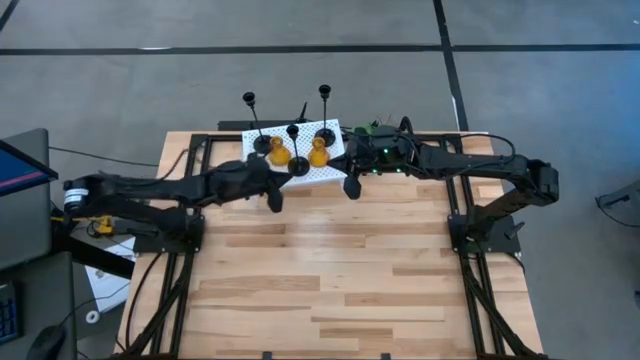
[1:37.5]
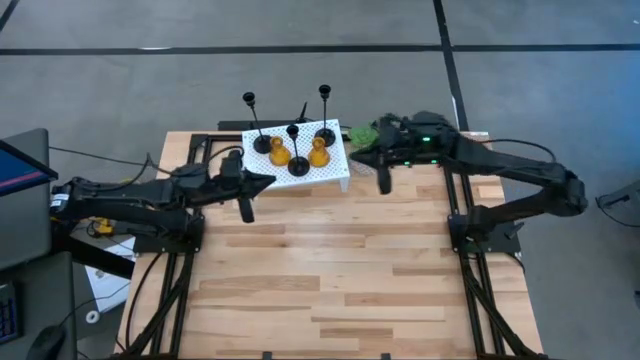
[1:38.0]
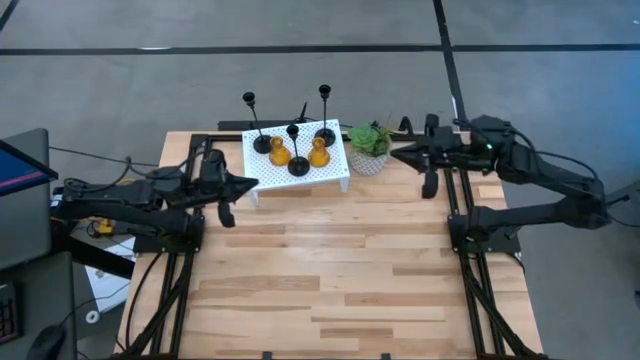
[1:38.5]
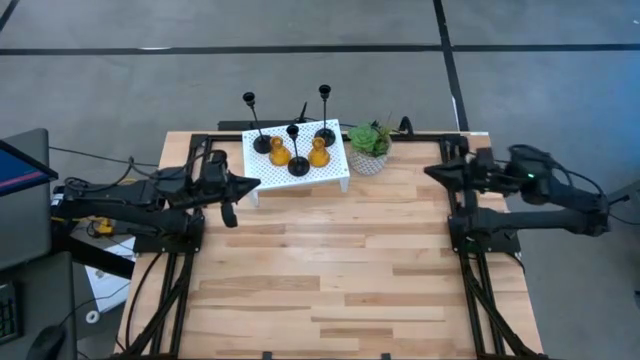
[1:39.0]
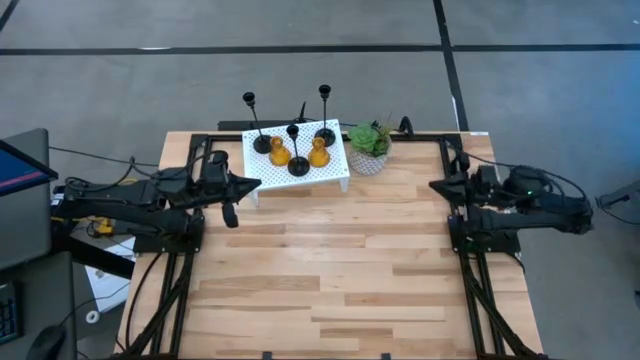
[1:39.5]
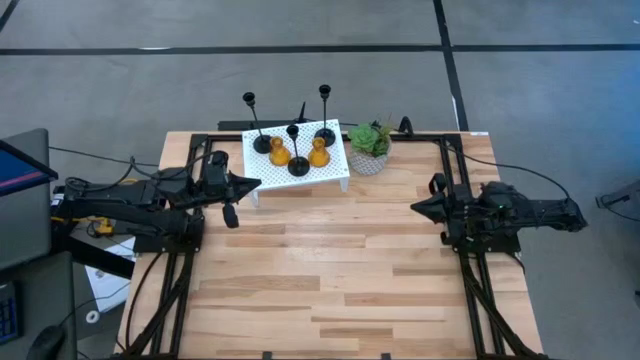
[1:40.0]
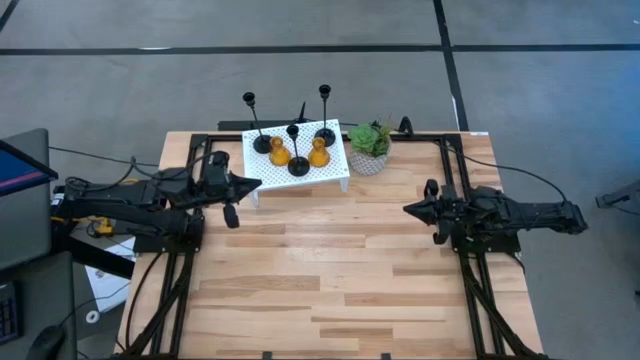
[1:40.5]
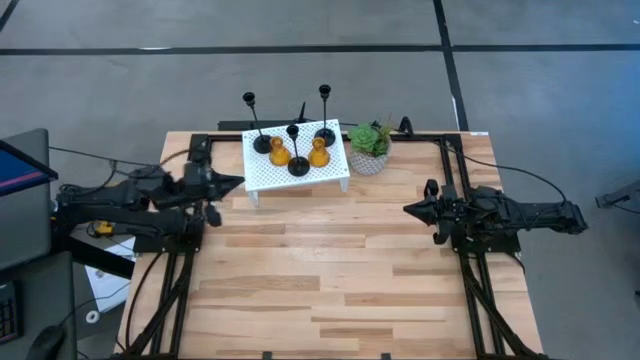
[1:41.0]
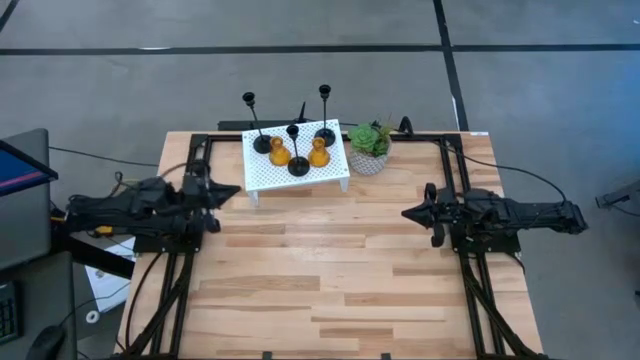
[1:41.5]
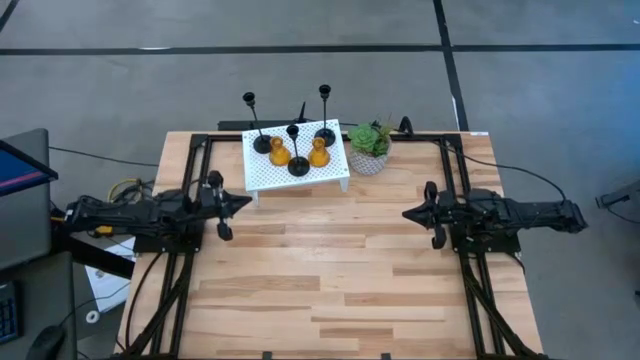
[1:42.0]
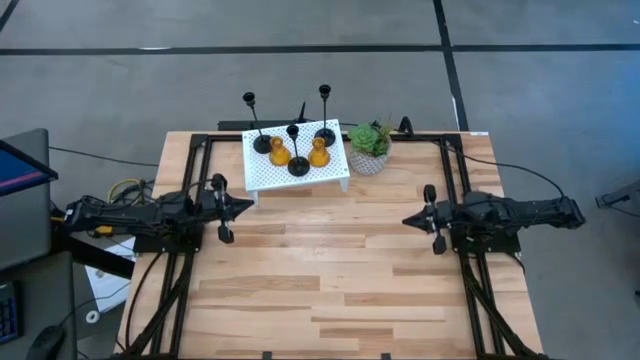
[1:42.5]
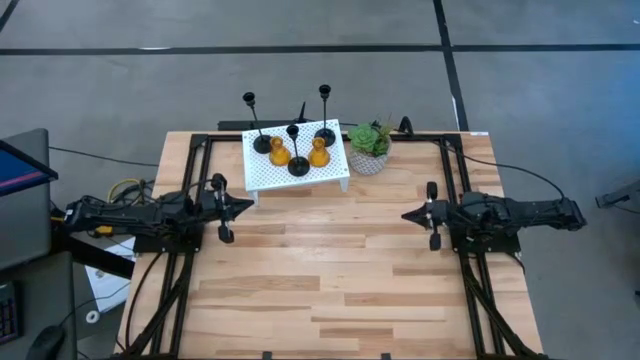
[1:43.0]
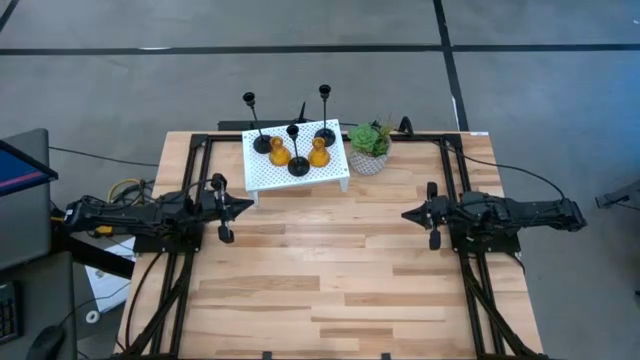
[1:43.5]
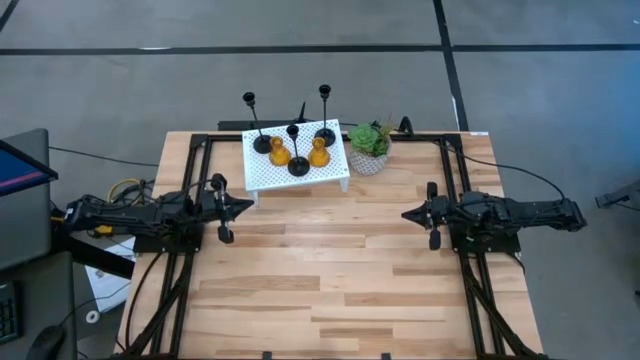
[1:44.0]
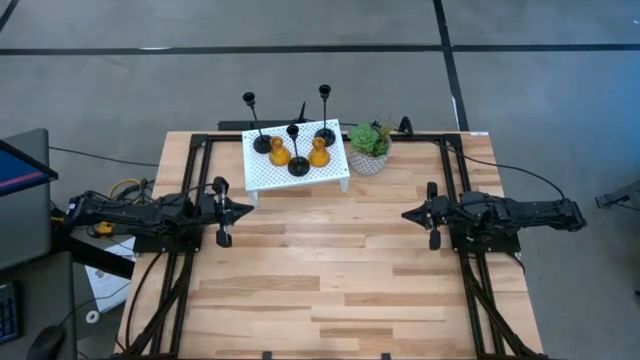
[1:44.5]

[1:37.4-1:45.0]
Task: Pick & Place candle stick holders
Return to Home Position

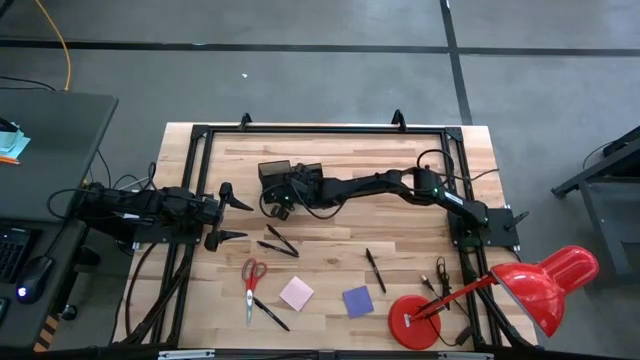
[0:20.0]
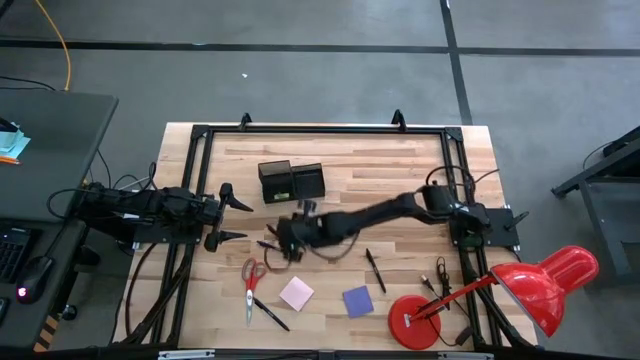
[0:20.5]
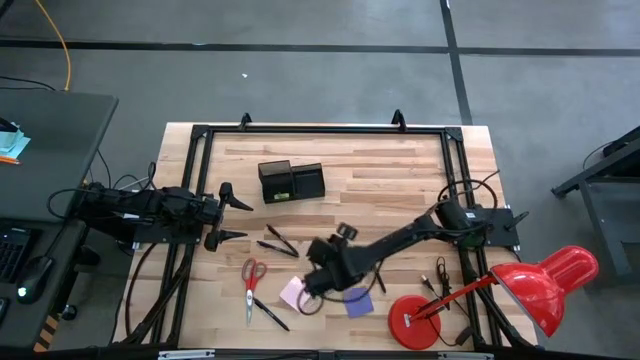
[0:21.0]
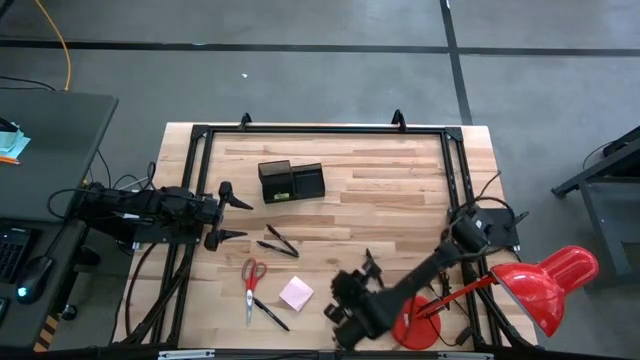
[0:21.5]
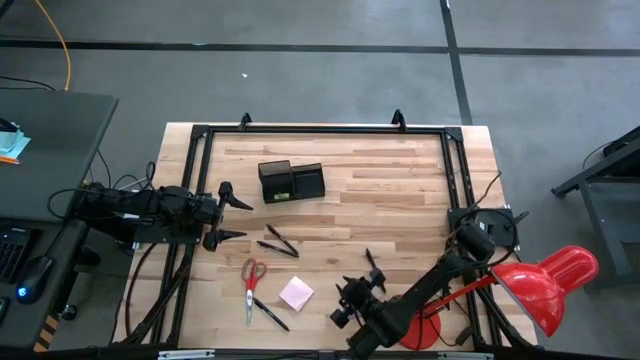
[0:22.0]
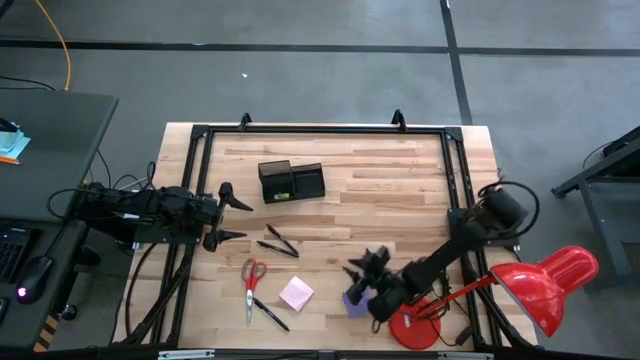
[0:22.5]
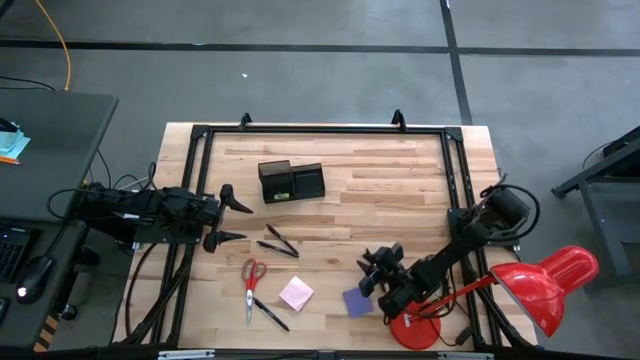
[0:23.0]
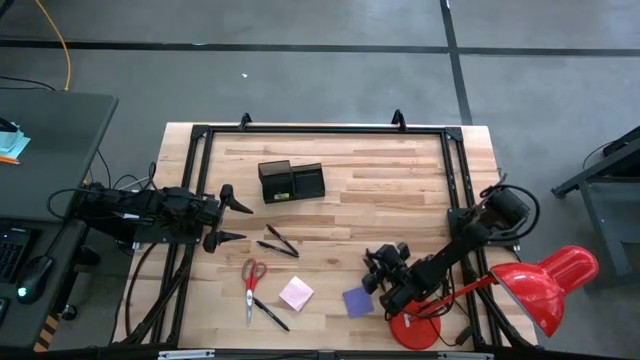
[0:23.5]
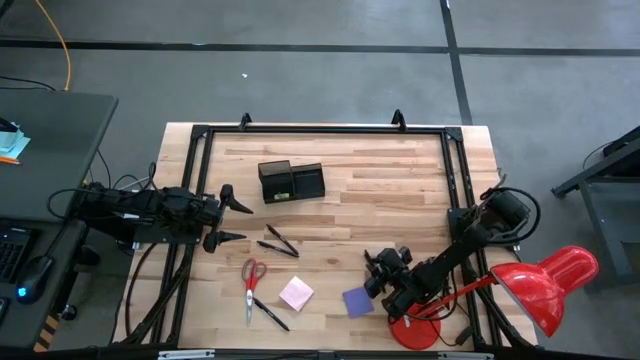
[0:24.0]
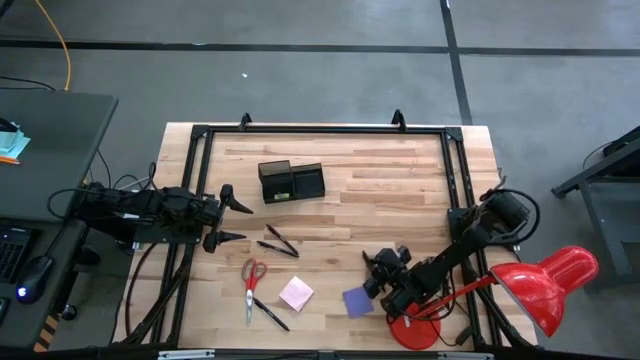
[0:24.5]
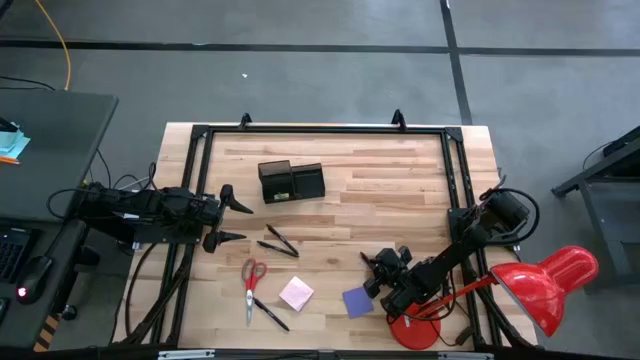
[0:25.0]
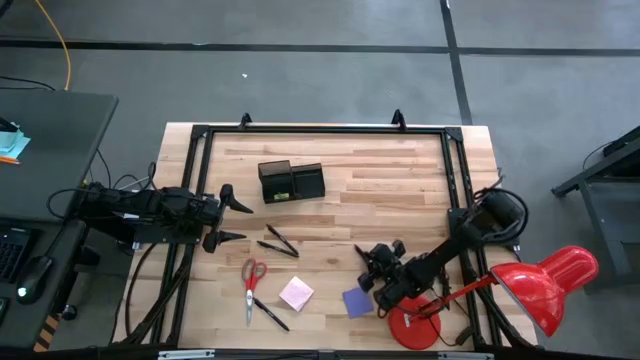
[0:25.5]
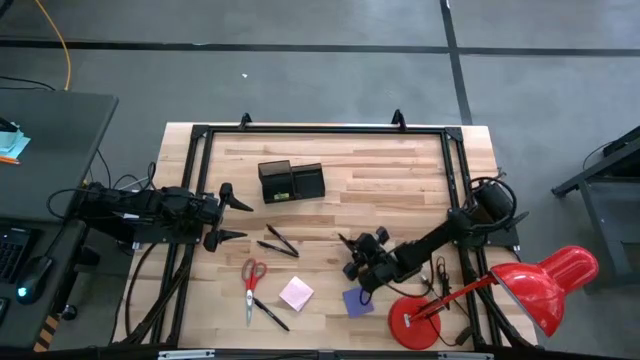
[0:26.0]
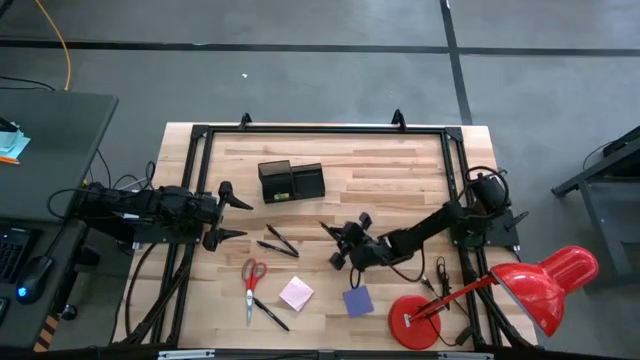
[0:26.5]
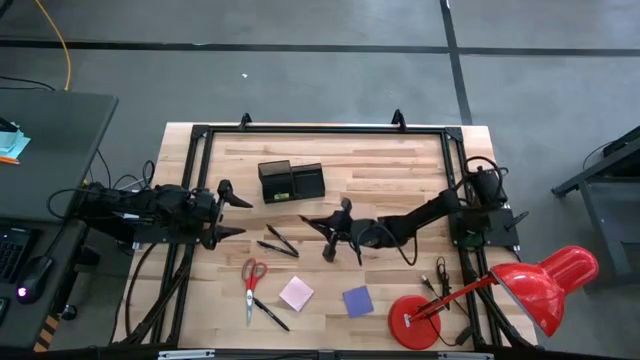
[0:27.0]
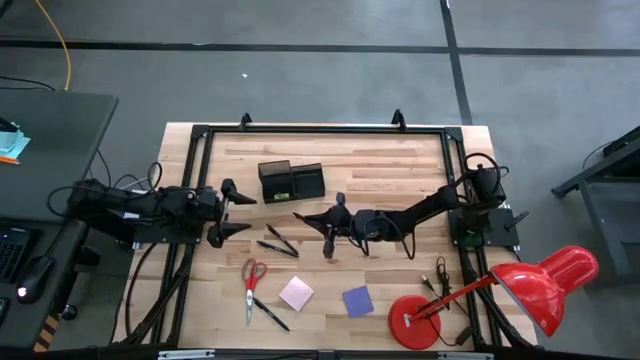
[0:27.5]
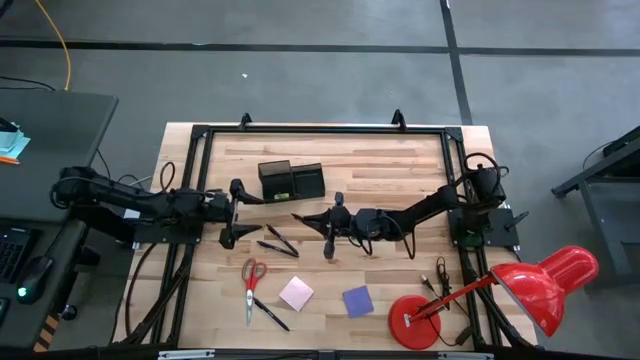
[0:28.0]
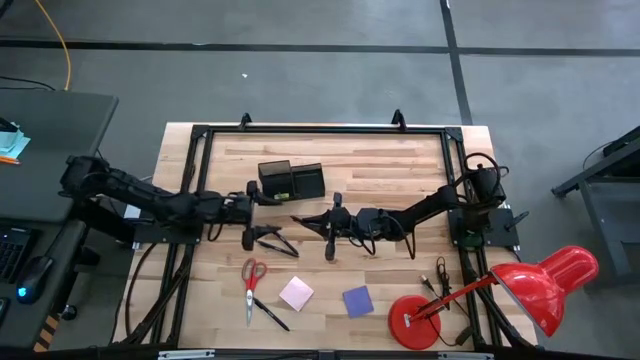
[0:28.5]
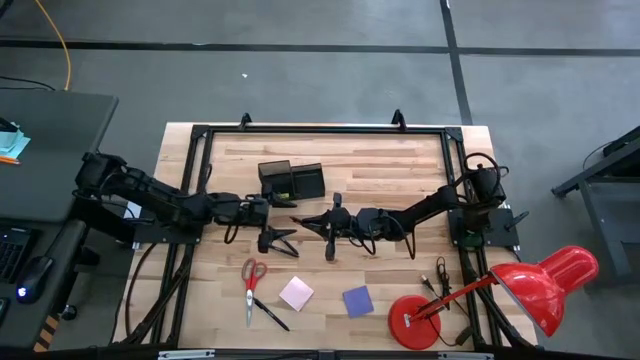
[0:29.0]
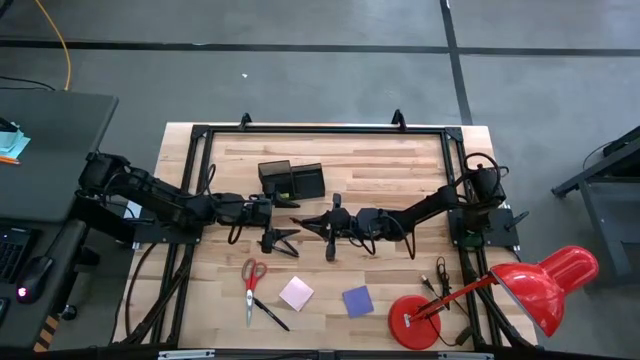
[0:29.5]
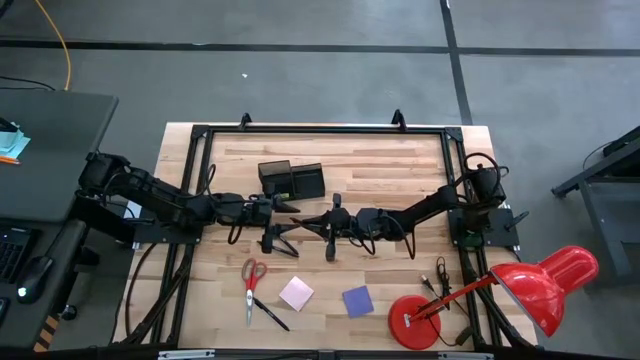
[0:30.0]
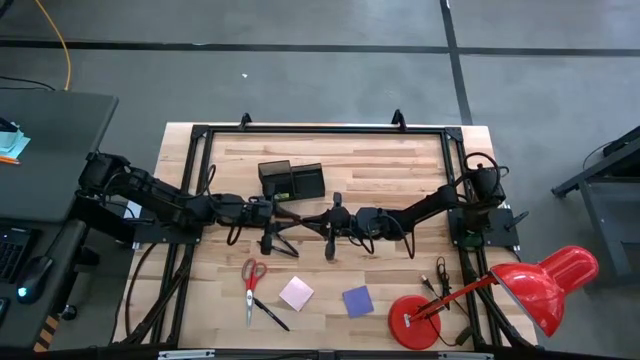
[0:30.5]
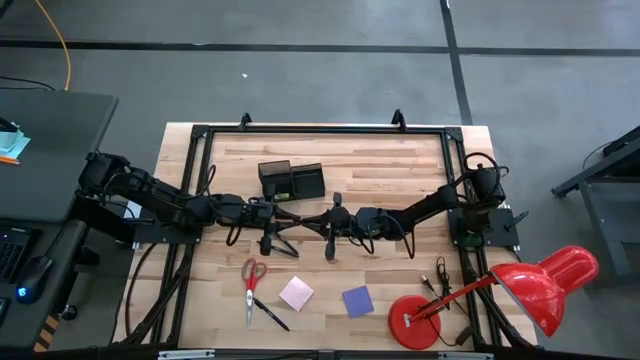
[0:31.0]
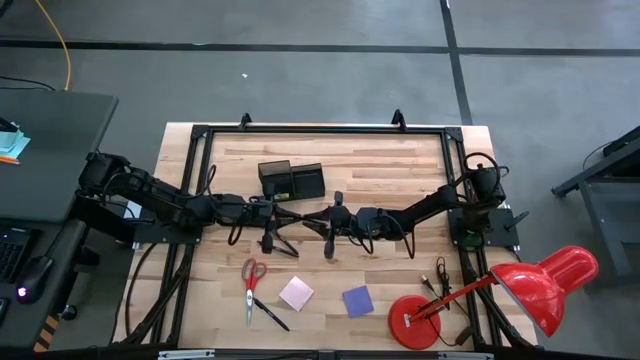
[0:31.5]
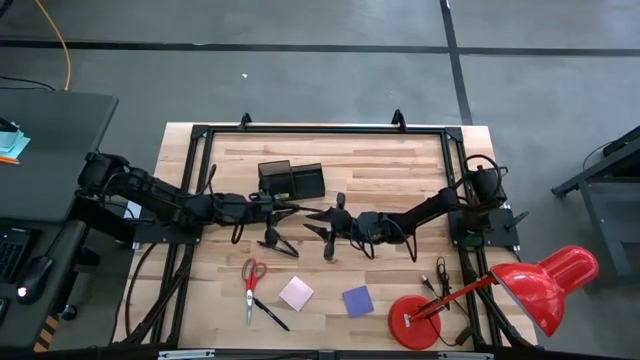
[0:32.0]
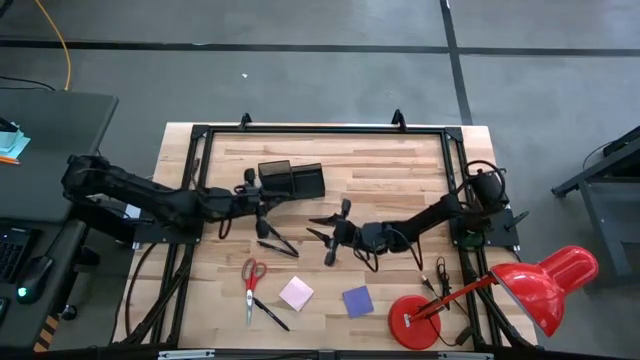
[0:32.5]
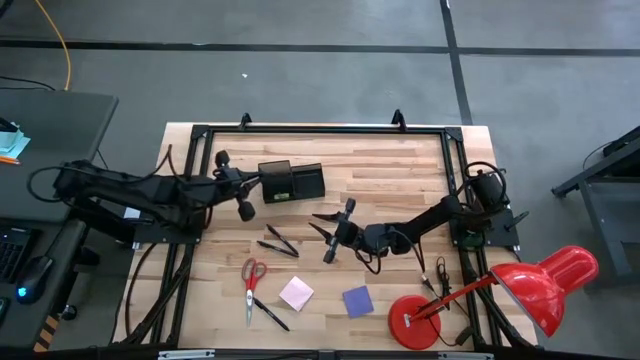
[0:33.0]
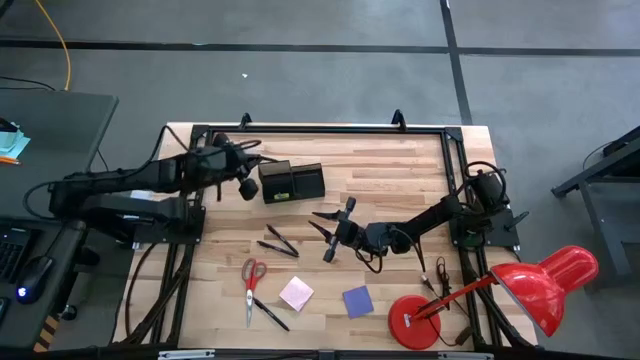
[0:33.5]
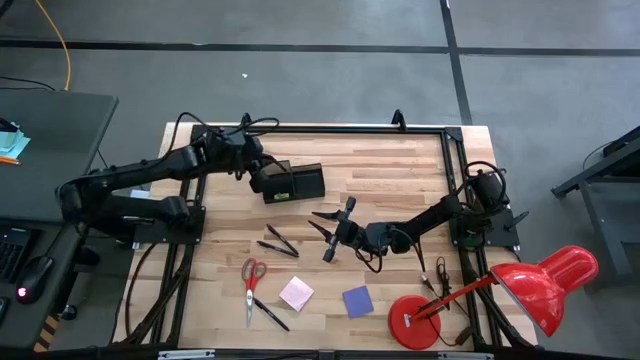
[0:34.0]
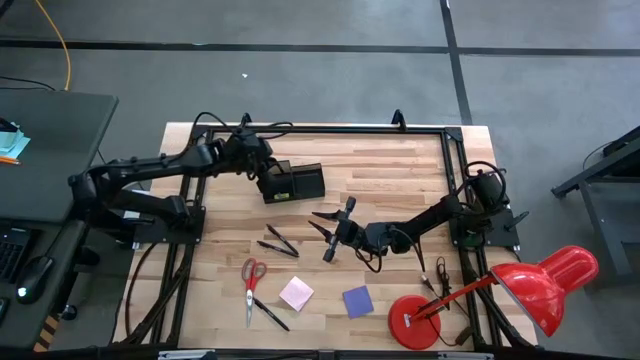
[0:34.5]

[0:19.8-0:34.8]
Task: Pick and place office supplies into organizer
Put the black pen into the black desk organizer
